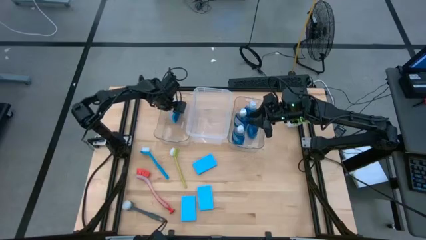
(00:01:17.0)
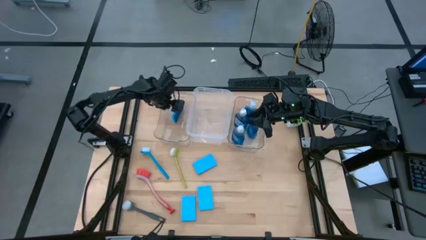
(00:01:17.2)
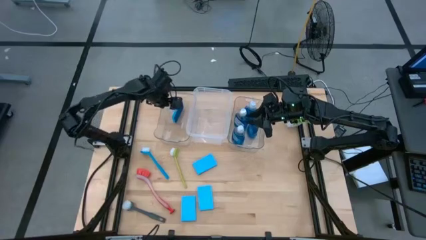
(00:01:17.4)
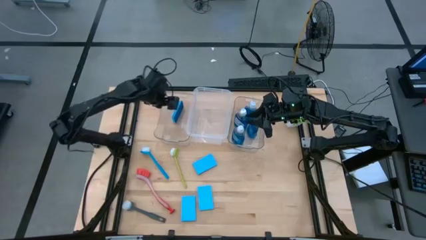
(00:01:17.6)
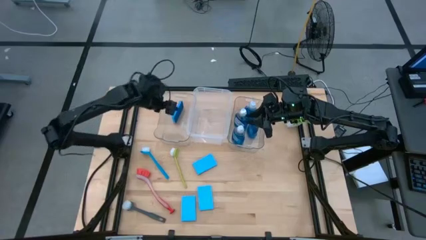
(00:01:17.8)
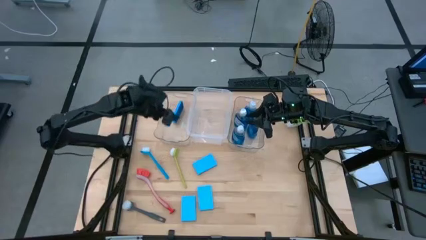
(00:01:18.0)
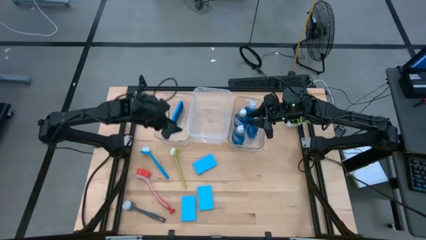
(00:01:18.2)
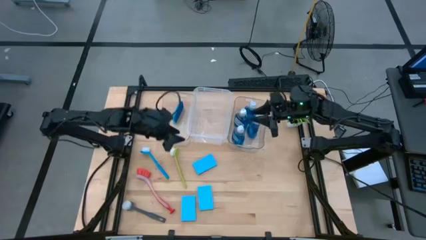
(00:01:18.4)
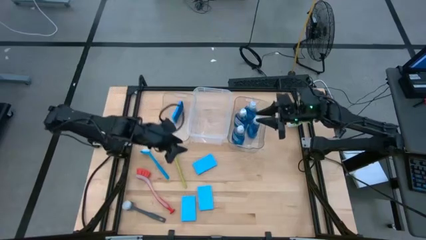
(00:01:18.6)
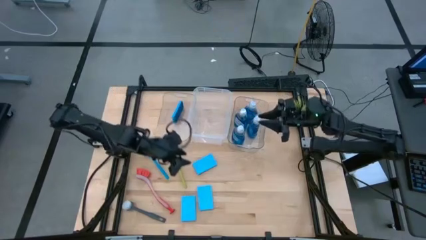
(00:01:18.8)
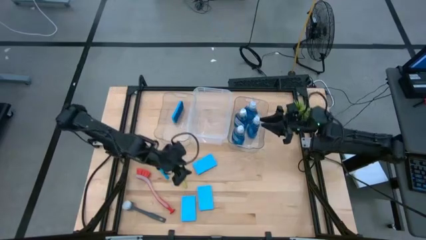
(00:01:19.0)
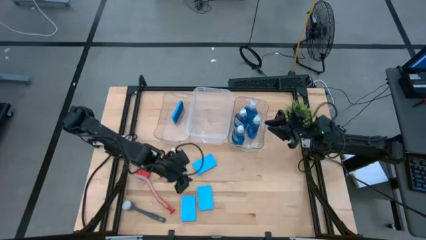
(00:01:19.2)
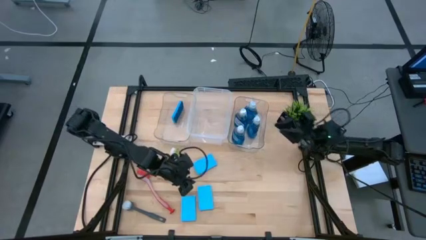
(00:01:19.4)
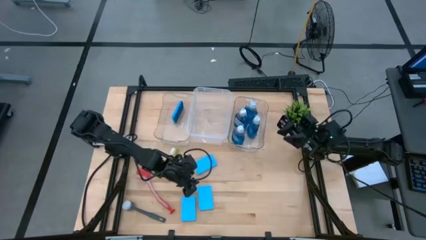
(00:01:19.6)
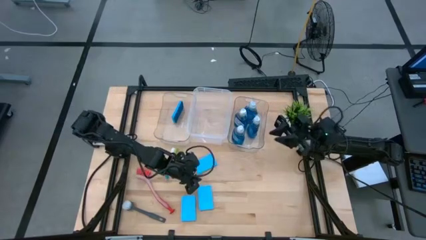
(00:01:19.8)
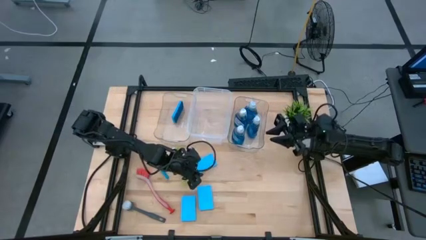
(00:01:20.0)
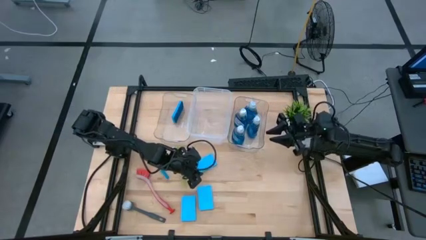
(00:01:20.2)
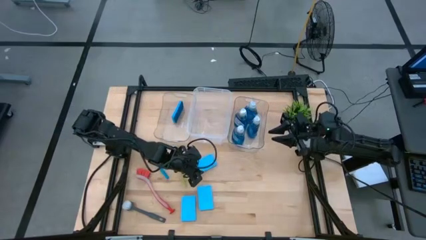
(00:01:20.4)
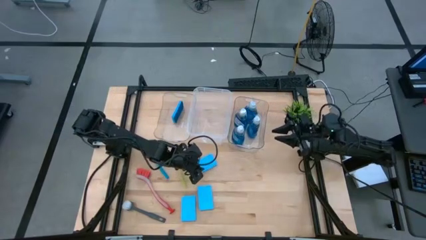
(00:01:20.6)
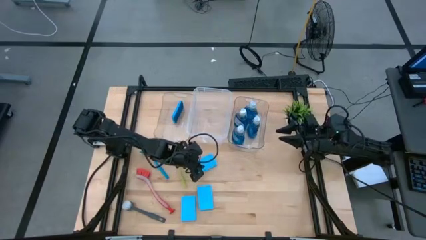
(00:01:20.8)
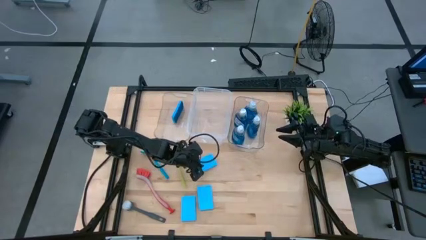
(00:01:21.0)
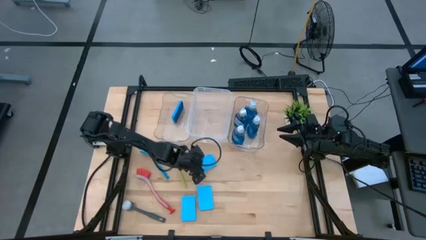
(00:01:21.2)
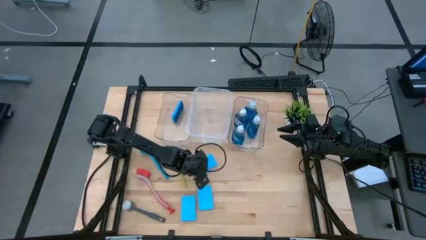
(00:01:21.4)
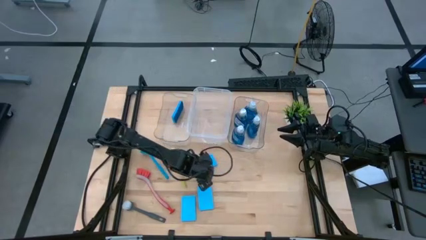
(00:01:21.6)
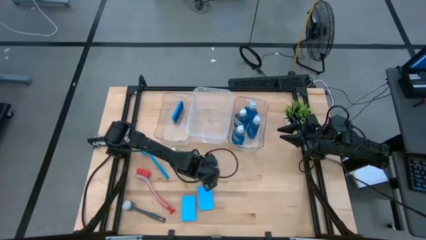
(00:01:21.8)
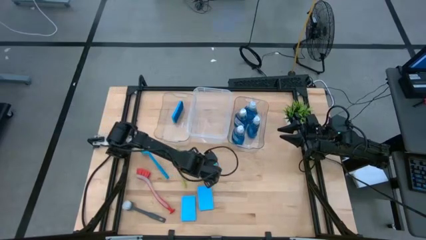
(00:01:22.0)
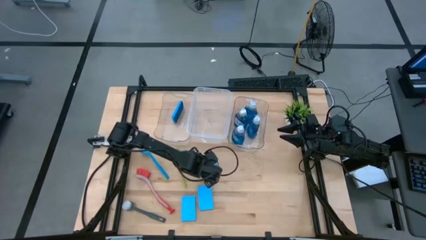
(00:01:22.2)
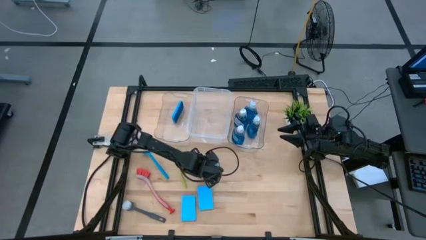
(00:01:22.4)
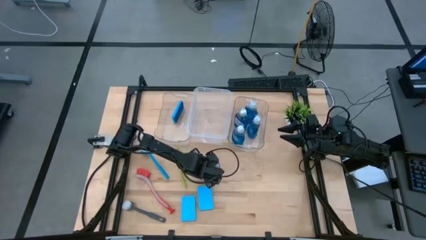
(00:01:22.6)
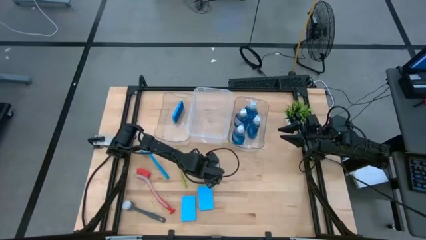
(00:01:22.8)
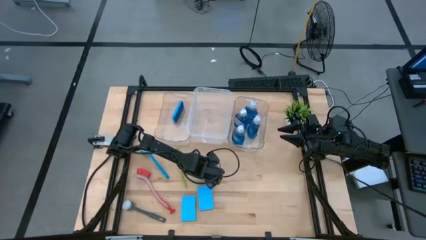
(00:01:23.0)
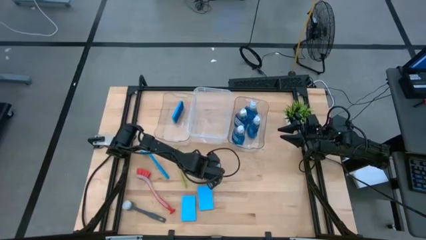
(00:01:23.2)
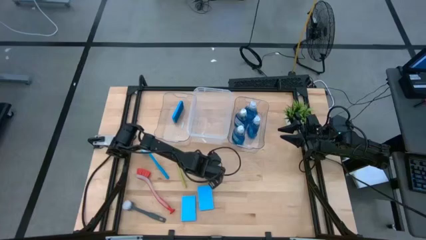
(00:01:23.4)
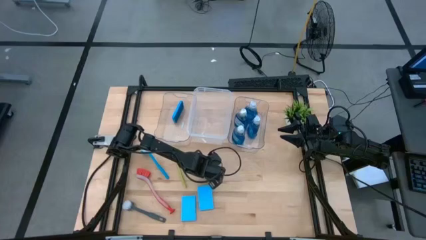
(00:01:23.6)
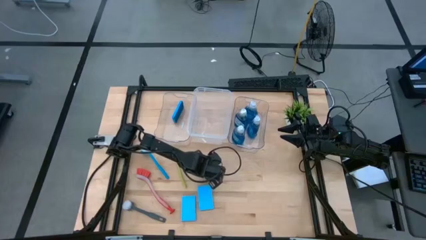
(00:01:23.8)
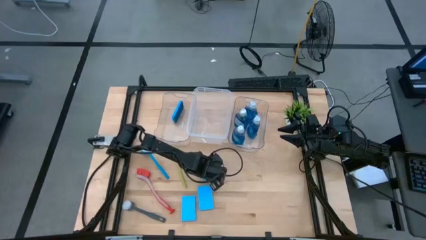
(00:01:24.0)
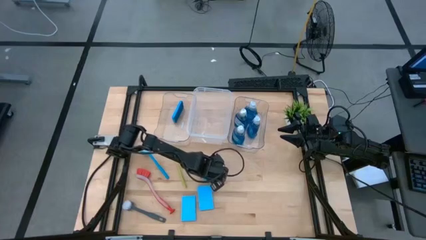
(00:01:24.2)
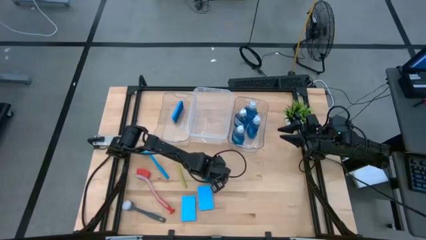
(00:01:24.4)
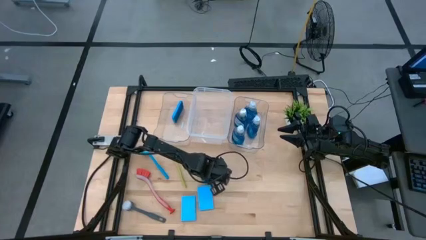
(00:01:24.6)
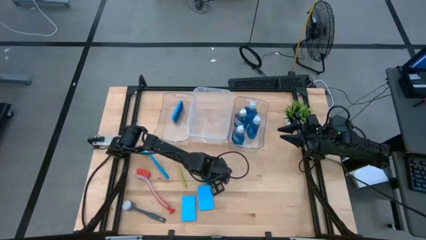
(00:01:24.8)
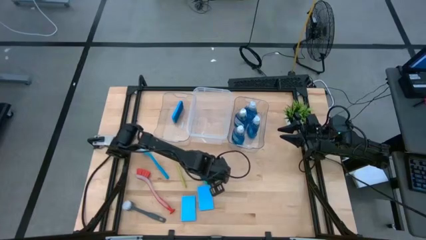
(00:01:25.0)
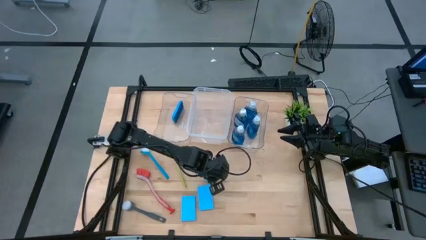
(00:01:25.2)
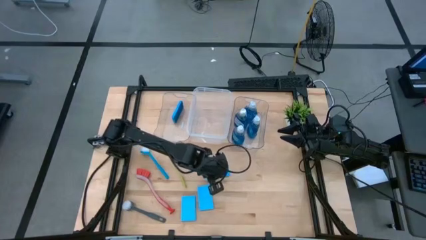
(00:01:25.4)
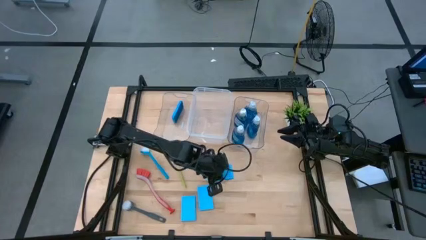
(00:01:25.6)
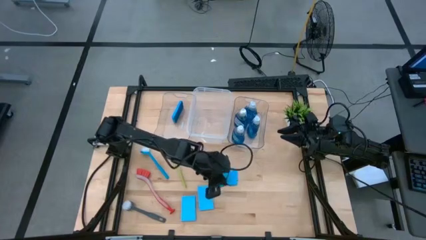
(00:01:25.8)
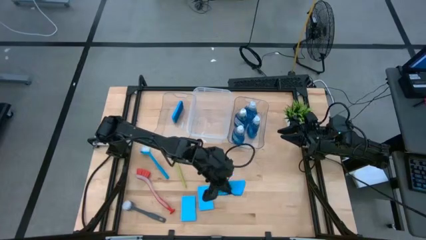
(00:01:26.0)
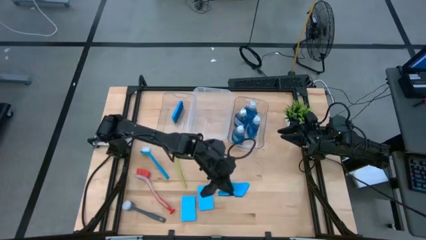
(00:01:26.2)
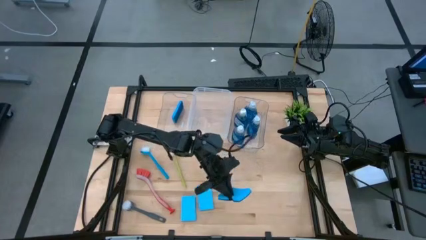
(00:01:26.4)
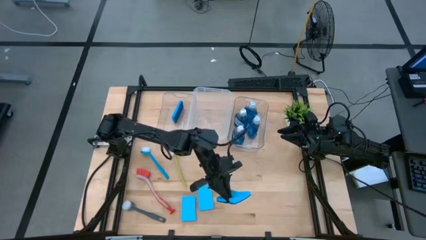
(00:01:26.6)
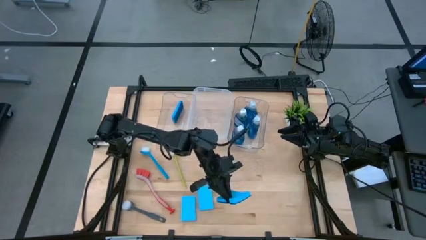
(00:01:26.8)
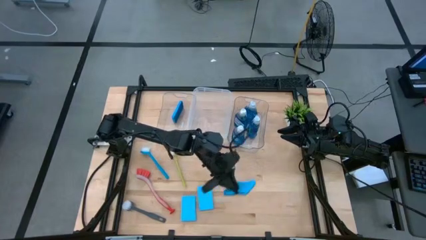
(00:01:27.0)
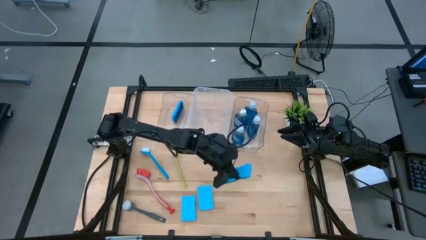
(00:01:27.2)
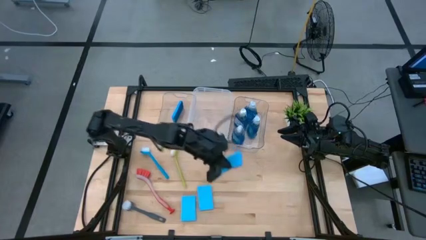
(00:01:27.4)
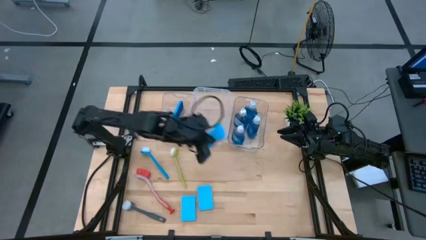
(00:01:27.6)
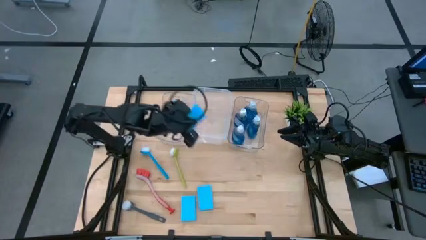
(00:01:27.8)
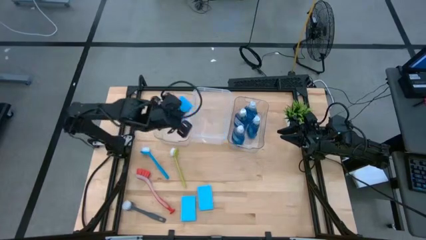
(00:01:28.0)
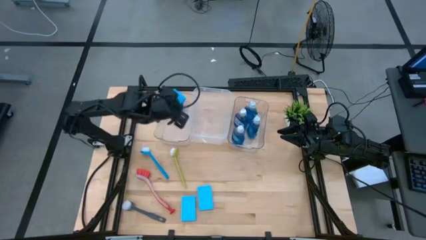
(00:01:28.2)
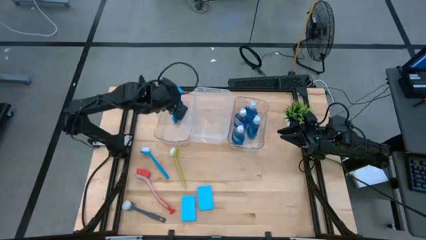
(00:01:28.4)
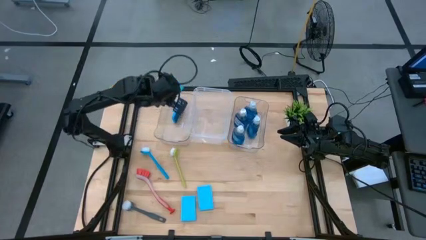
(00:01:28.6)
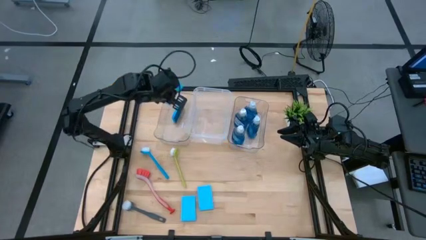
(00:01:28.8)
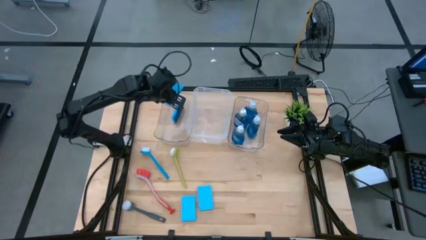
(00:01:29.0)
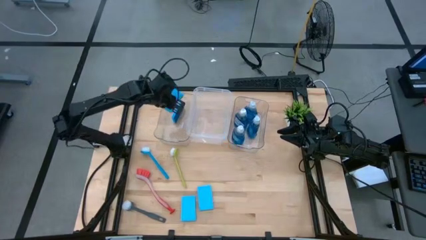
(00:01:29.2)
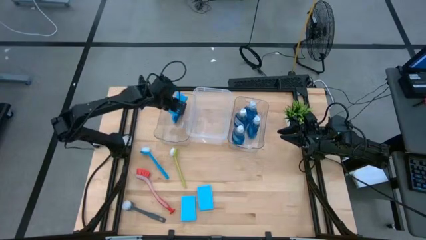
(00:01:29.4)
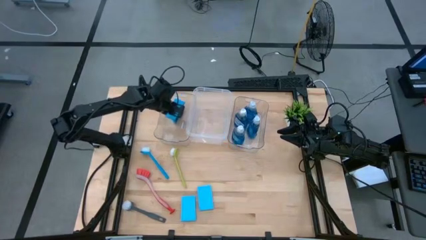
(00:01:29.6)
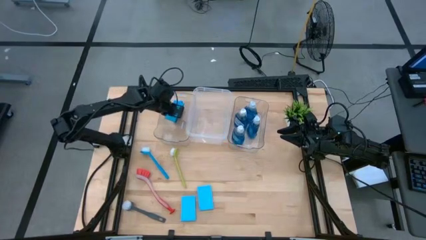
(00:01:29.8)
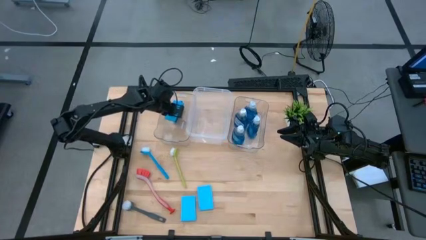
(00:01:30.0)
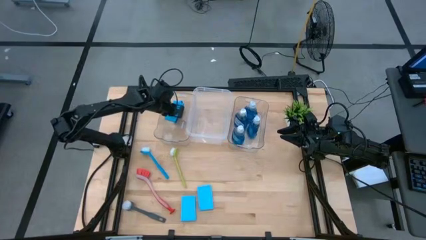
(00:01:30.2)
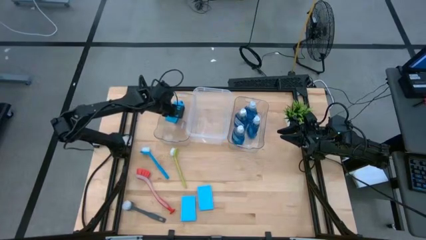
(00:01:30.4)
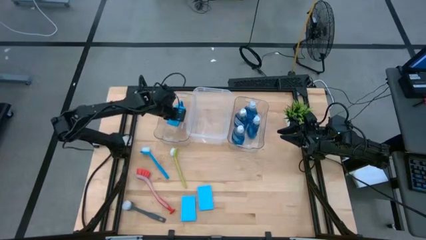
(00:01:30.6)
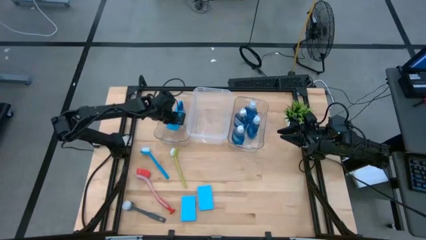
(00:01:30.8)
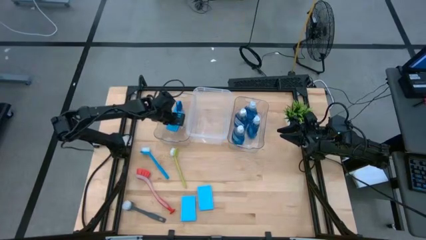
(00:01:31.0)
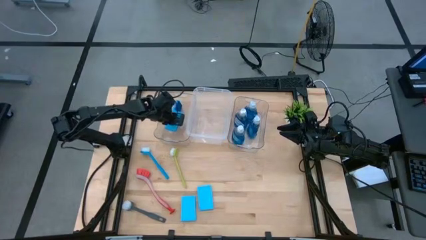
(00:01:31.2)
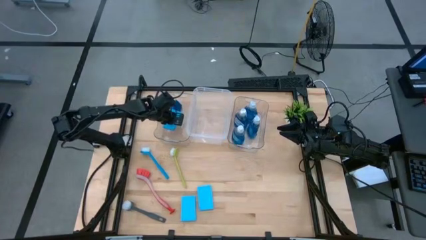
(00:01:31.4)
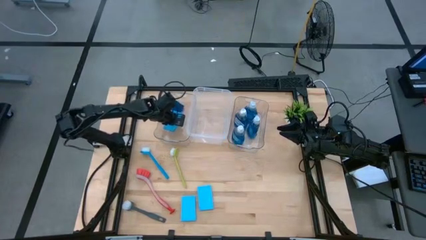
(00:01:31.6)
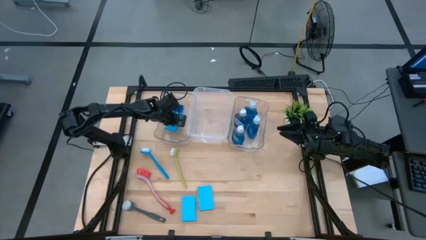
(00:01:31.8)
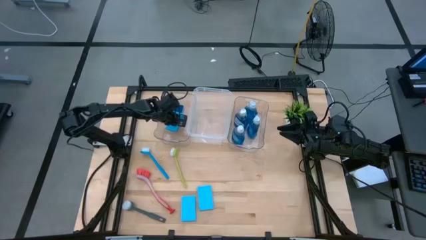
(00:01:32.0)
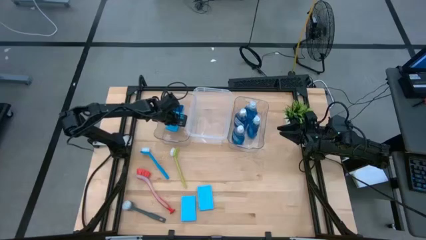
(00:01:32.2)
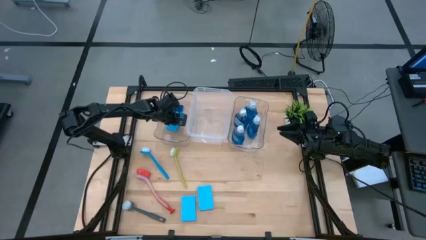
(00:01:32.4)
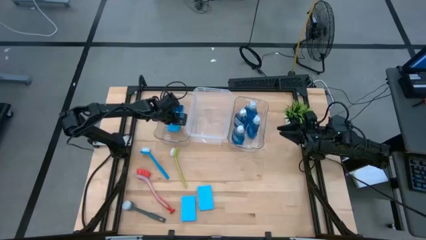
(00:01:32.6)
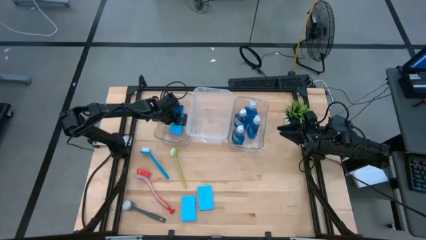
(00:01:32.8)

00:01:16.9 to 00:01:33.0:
Task: Pick & Place Kitchen Sink Supplies
Put the blue sponge into the left transparent bin
